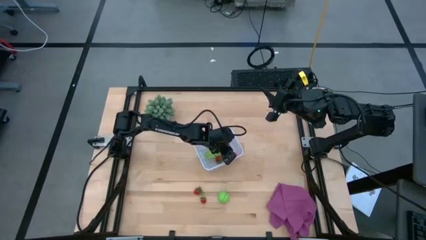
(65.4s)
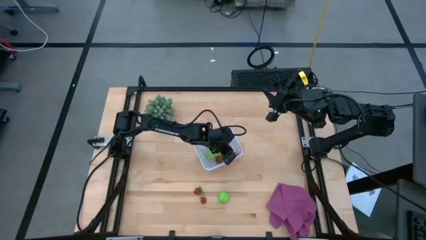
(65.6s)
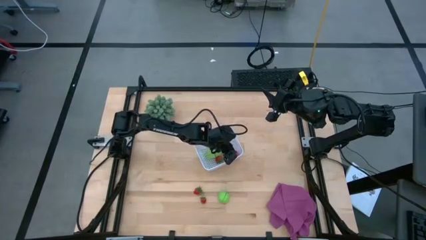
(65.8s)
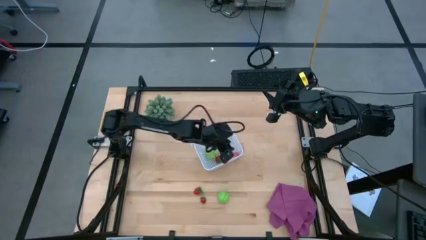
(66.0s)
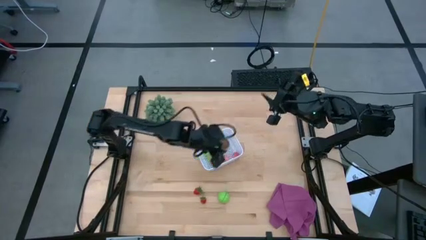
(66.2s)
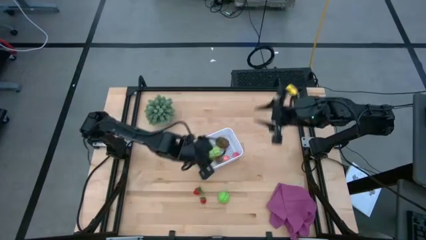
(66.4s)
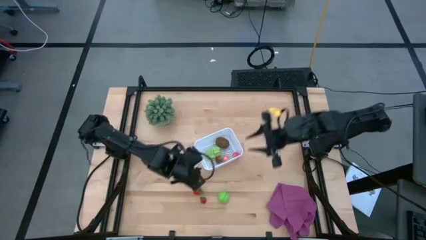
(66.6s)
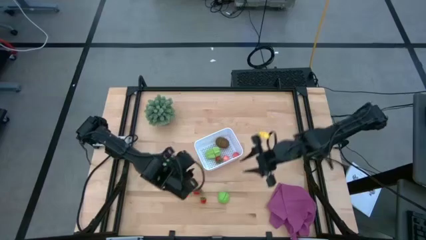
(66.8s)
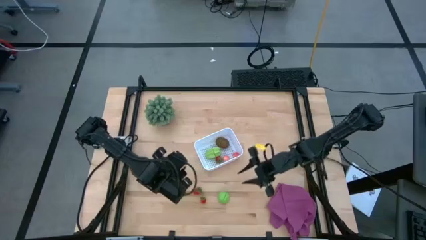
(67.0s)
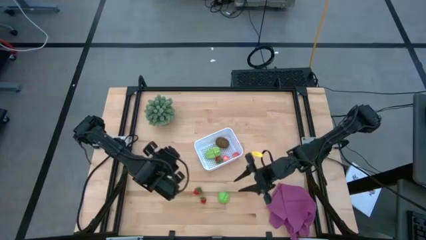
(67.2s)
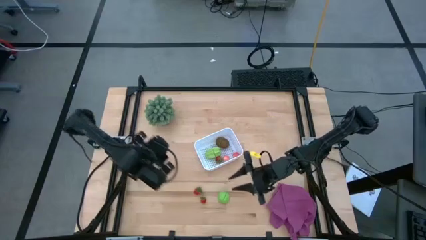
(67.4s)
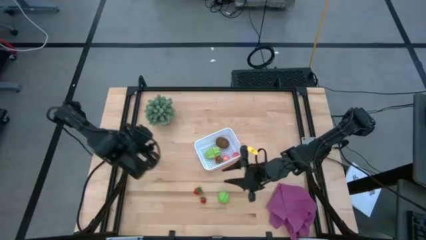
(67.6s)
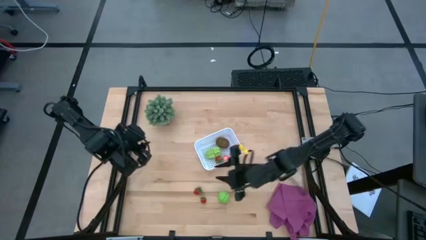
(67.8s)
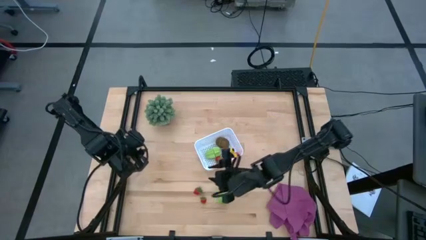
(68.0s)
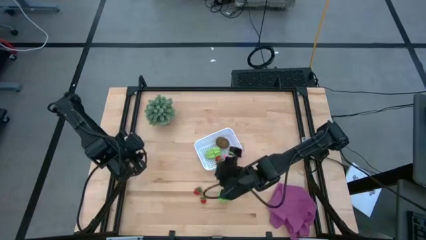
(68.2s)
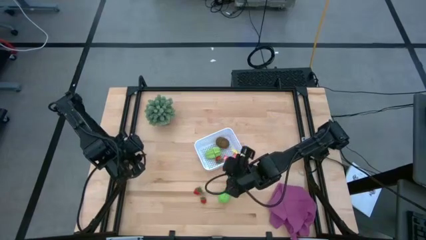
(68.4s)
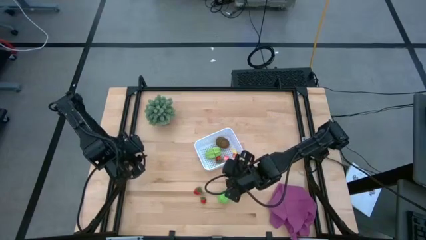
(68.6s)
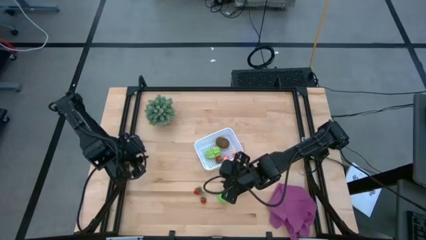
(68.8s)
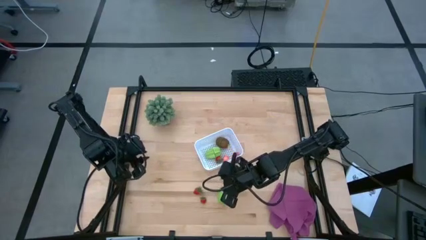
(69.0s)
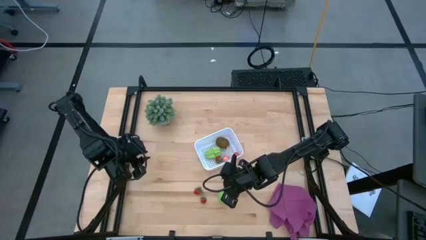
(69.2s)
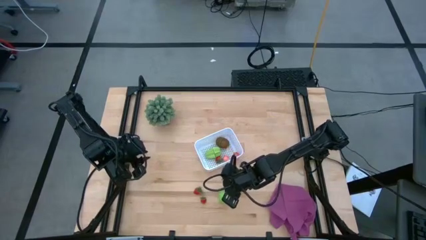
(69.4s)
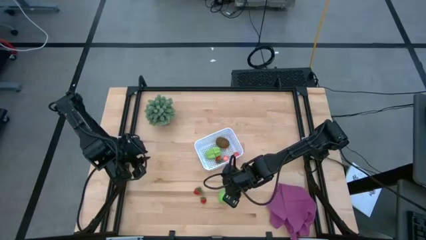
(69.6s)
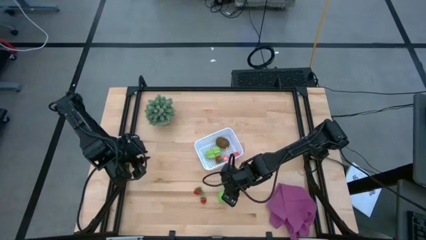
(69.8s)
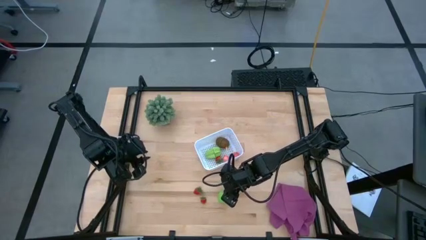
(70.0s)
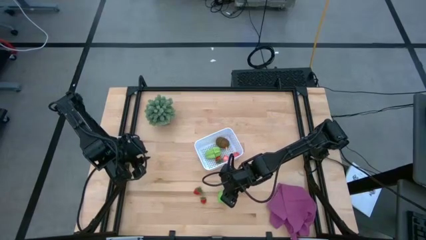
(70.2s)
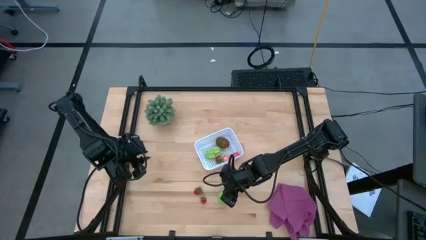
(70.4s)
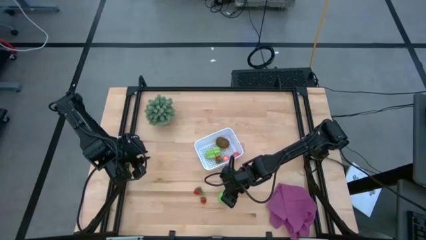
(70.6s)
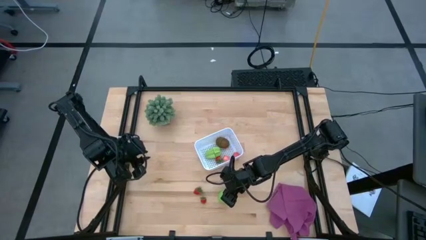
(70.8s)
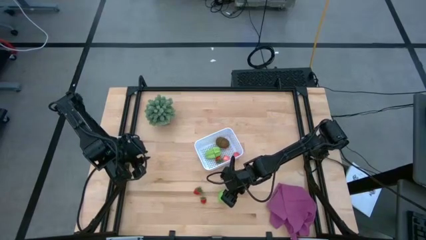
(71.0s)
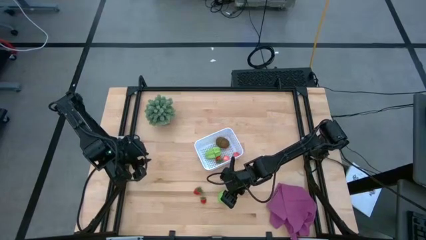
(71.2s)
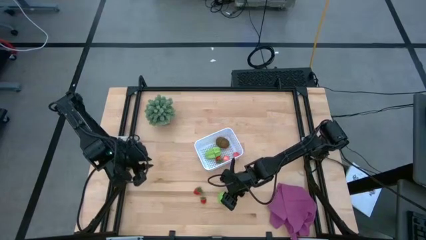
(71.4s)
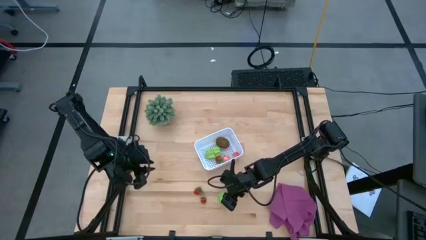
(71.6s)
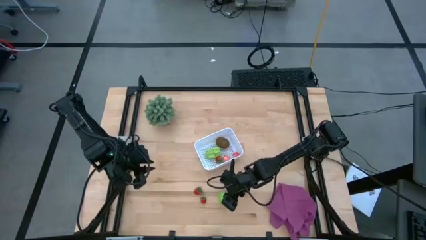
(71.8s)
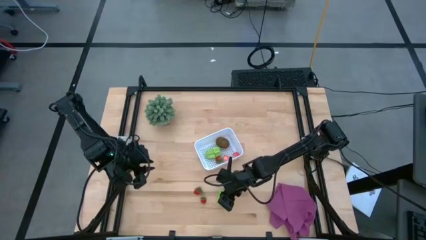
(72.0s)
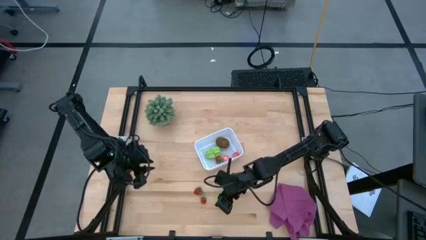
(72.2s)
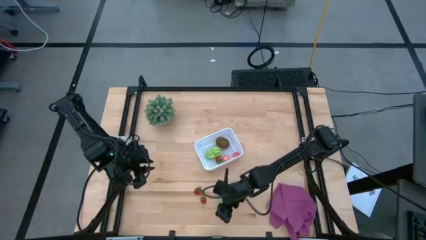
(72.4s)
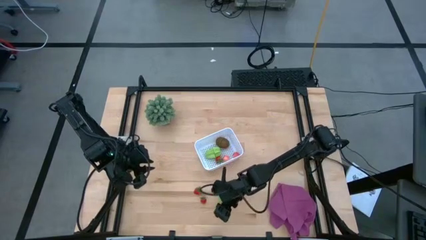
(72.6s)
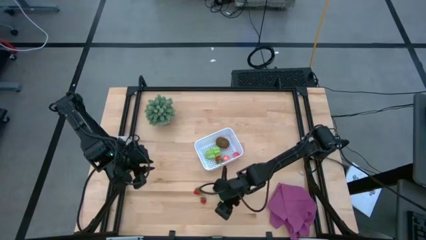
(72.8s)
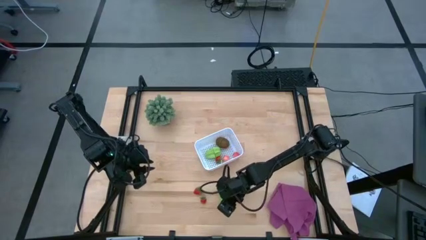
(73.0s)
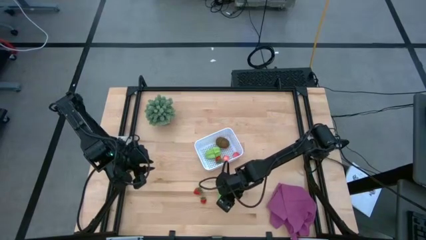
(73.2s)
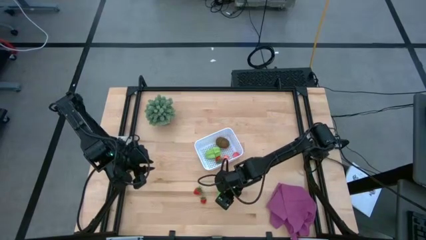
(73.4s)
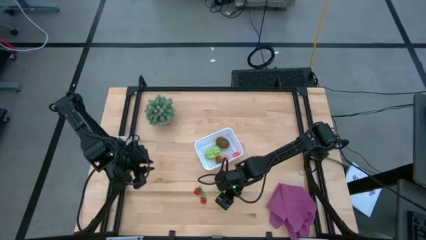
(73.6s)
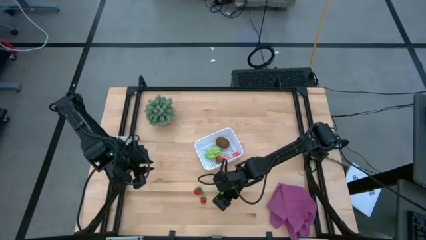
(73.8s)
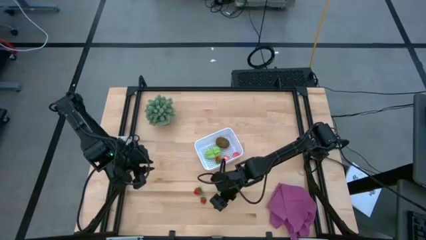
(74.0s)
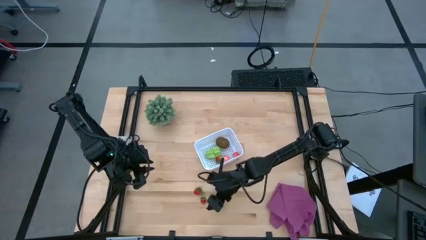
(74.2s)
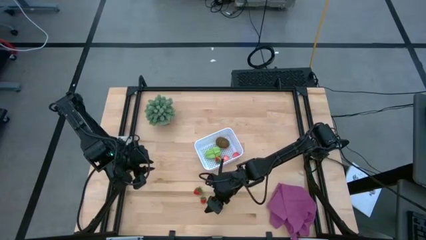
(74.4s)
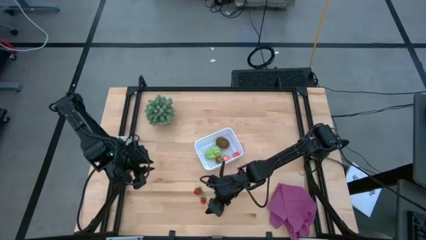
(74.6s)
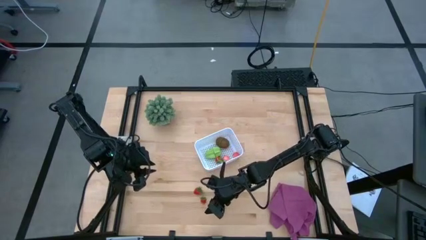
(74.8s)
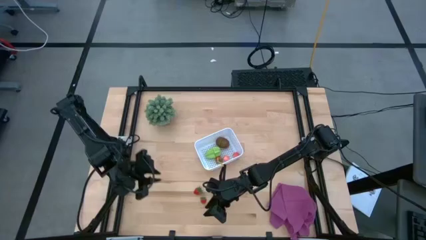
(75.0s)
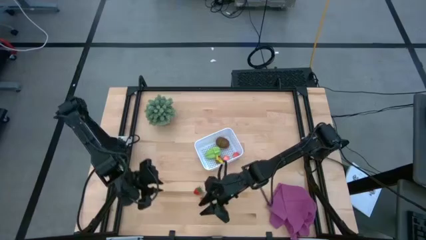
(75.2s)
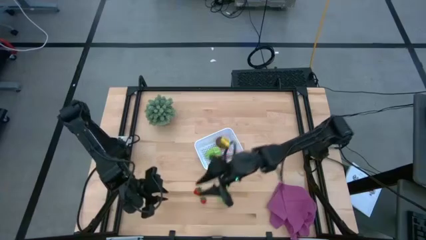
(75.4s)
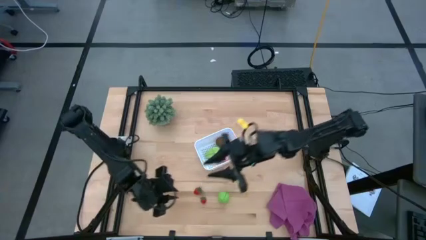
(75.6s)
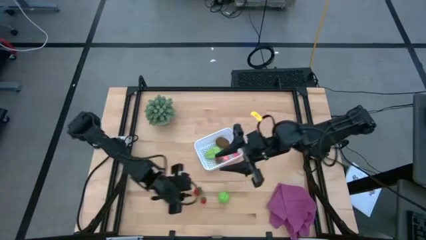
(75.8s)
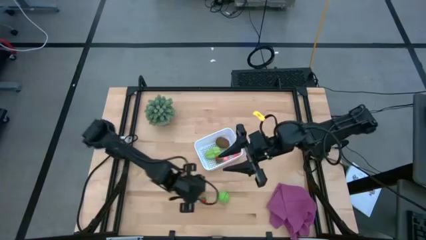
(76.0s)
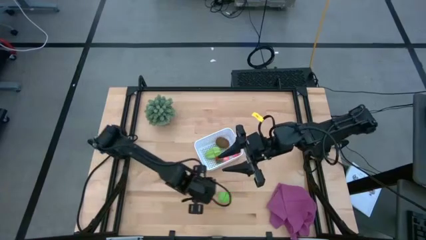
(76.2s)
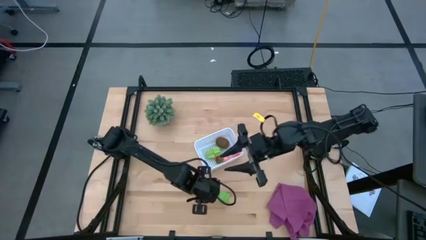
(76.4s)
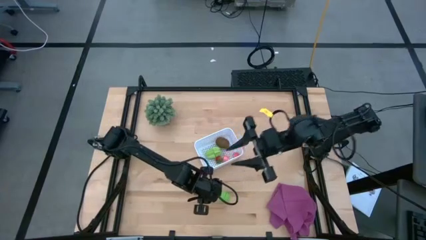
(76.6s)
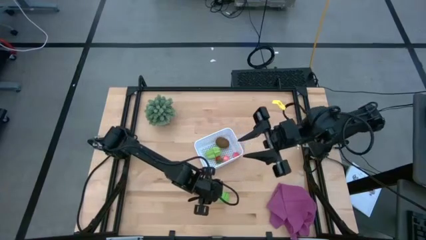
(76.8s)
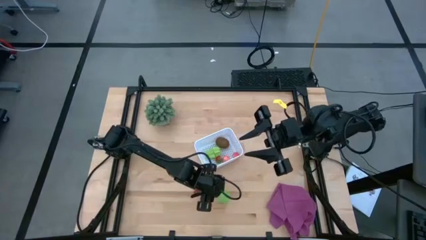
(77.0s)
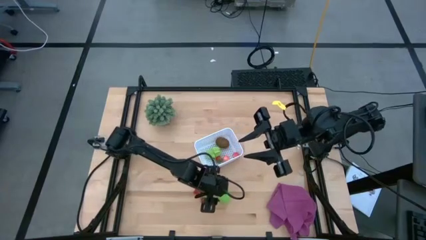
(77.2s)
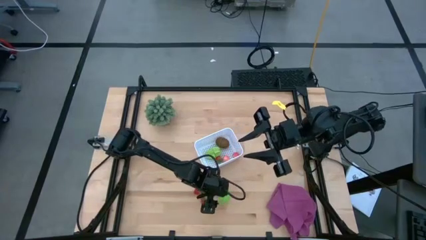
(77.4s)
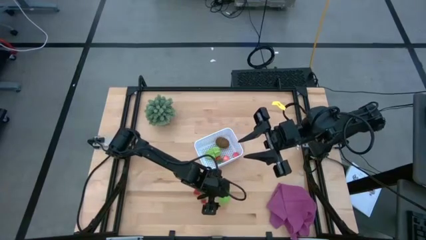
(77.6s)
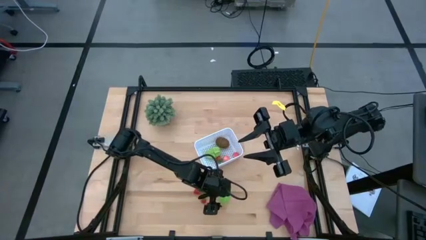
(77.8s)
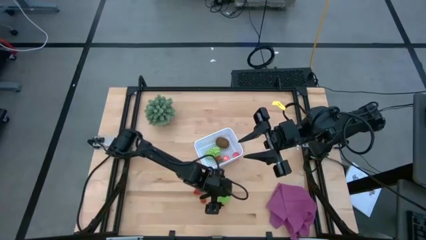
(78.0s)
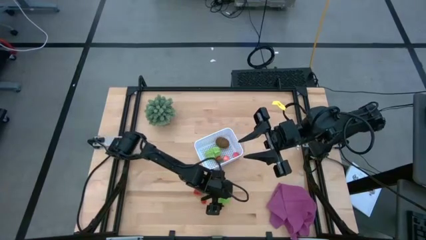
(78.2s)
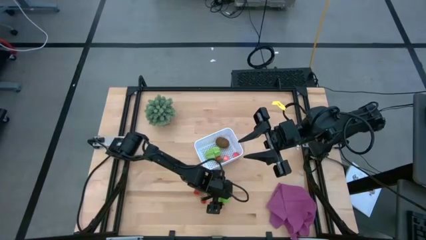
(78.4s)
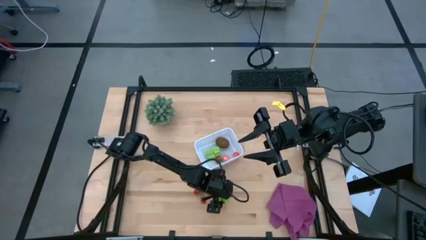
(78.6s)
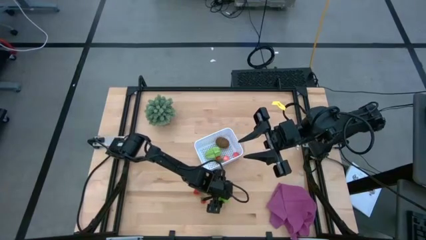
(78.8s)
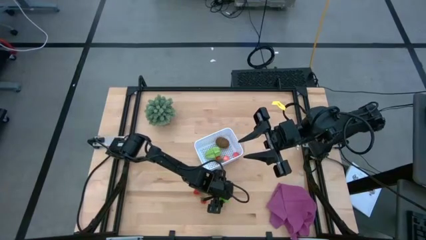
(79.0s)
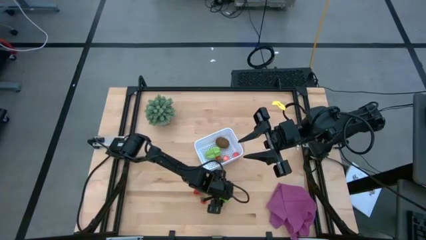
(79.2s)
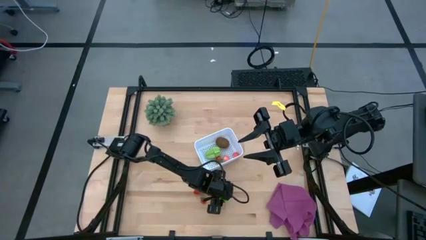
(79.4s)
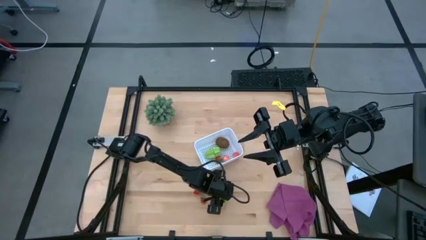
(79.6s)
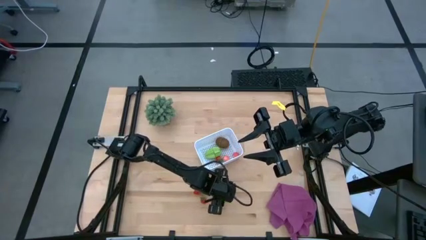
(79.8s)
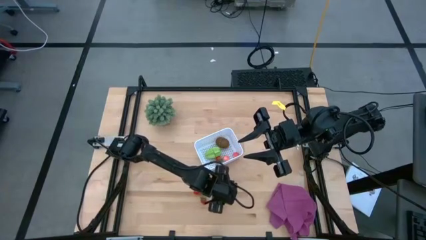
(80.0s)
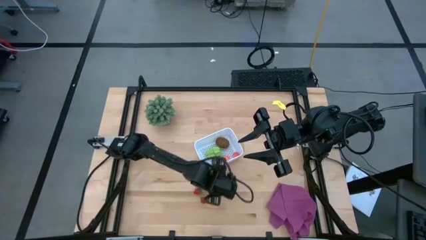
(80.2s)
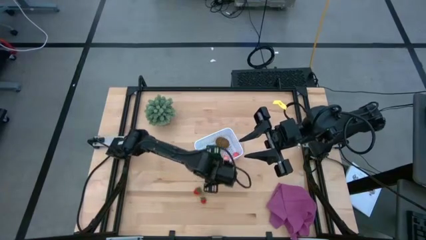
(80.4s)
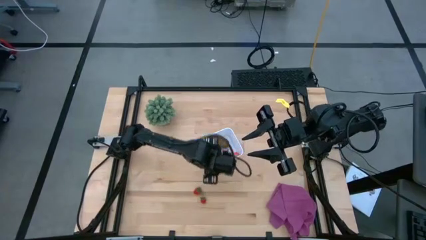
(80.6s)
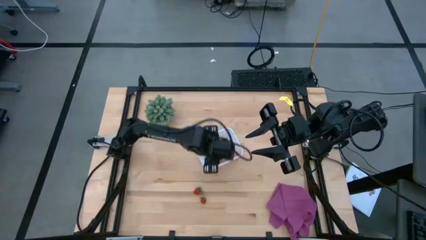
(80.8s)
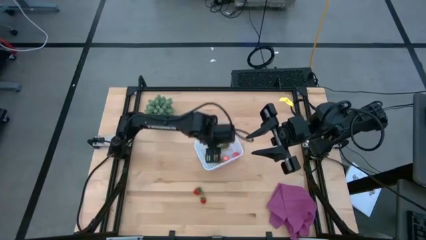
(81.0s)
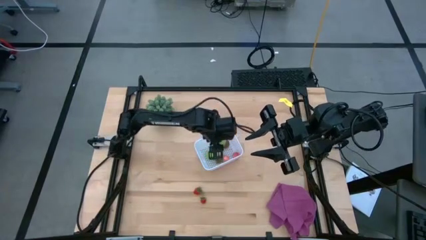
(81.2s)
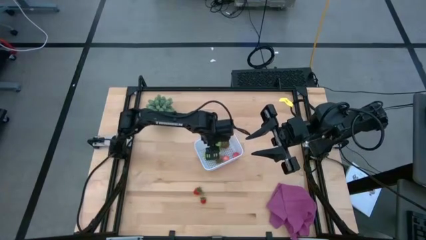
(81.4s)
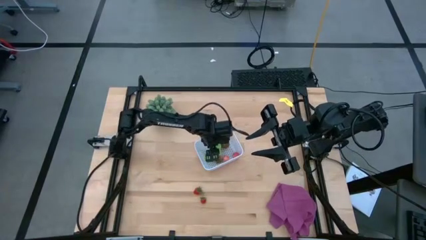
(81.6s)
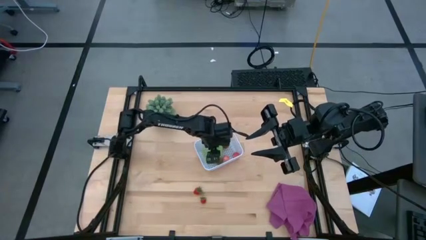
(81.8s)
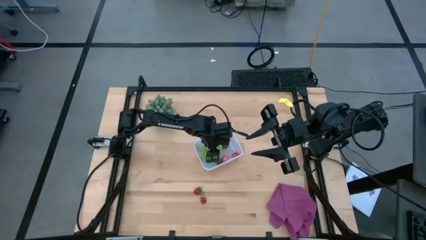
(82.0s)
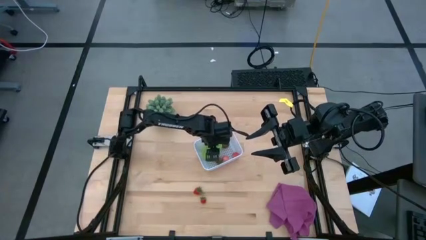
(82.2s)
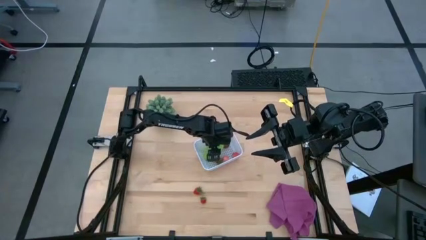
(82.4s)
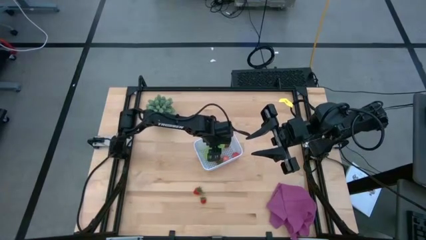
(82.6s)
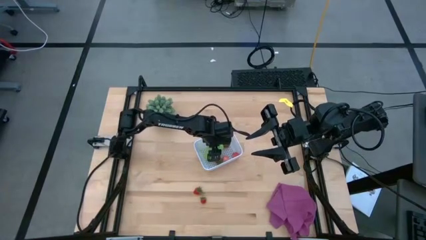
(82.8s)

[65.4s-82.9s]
Task: Pick and placing Produce into tupperware
Put the cabbage into the white bin
